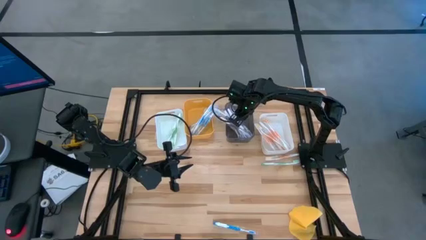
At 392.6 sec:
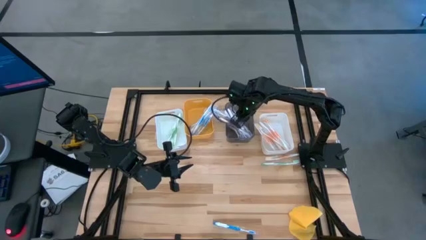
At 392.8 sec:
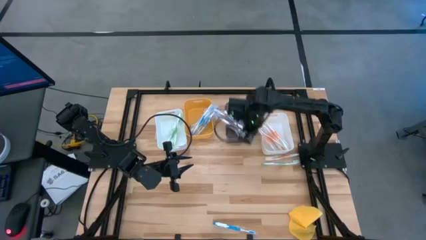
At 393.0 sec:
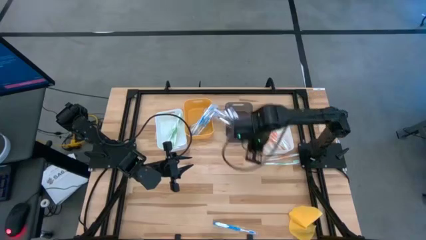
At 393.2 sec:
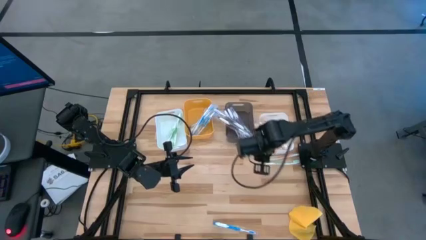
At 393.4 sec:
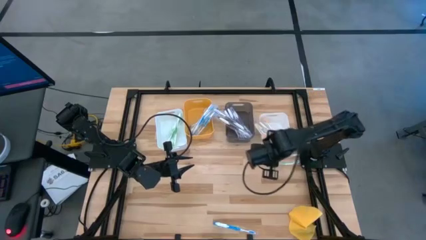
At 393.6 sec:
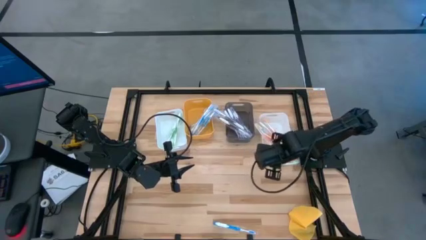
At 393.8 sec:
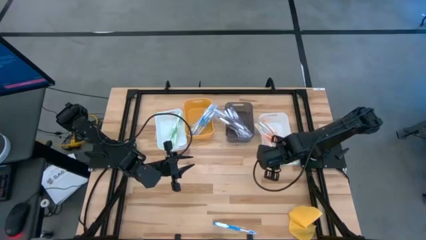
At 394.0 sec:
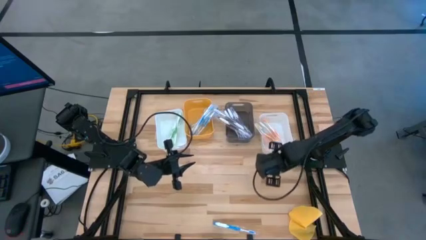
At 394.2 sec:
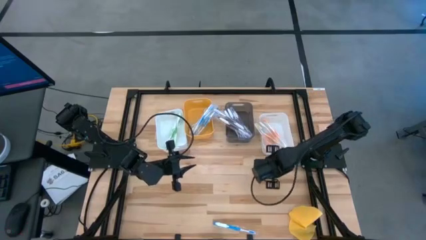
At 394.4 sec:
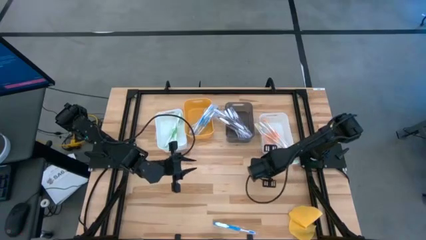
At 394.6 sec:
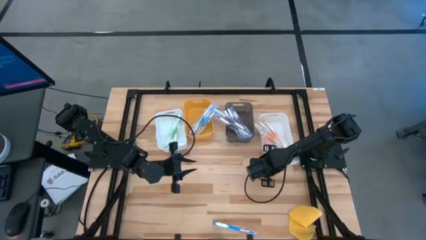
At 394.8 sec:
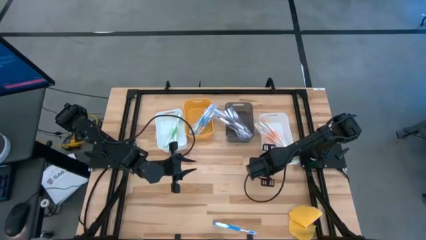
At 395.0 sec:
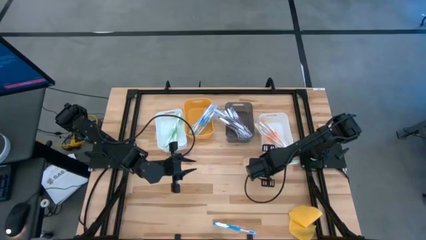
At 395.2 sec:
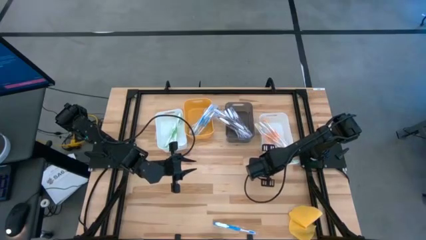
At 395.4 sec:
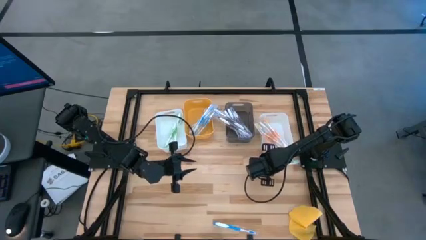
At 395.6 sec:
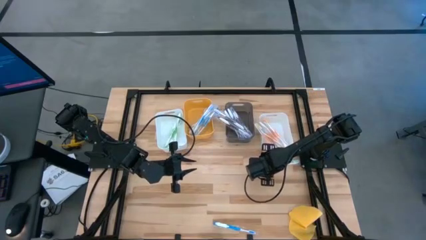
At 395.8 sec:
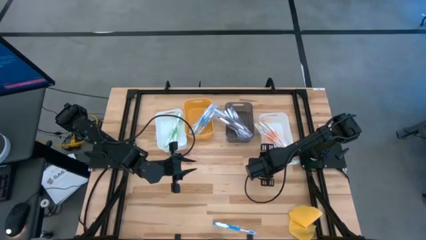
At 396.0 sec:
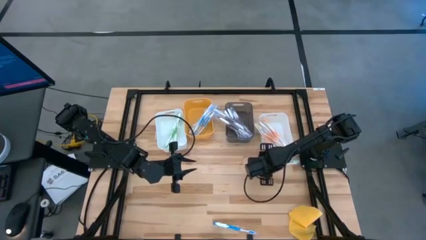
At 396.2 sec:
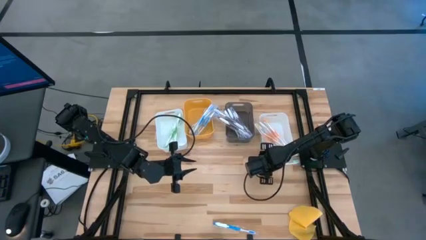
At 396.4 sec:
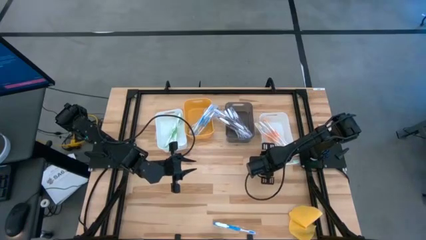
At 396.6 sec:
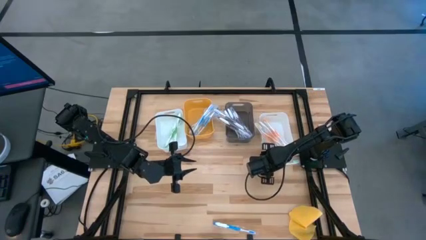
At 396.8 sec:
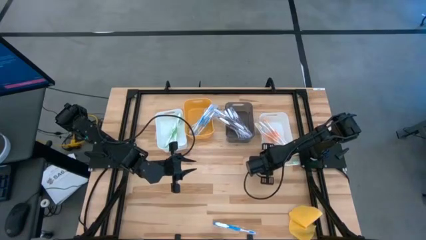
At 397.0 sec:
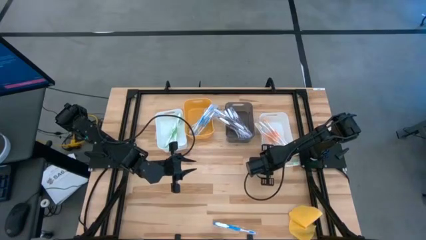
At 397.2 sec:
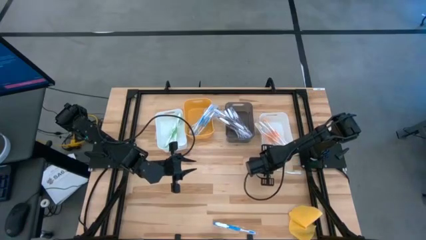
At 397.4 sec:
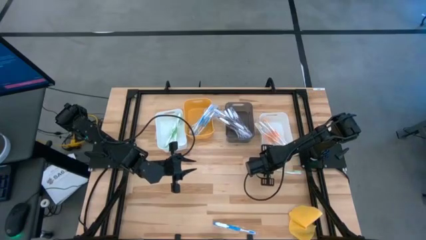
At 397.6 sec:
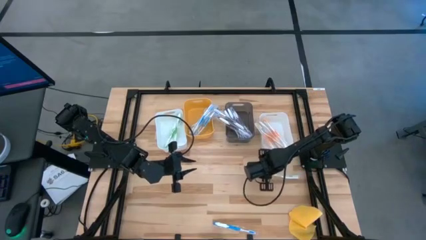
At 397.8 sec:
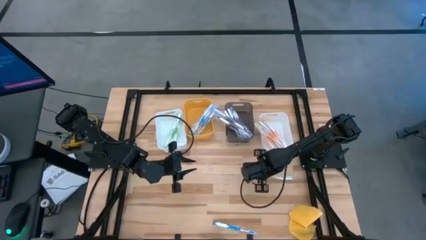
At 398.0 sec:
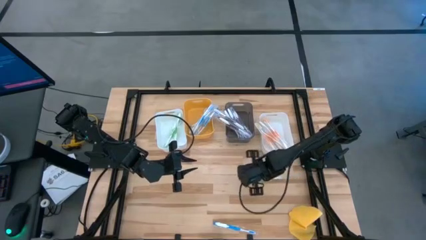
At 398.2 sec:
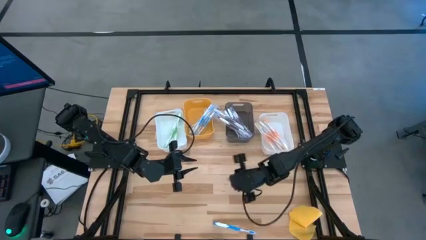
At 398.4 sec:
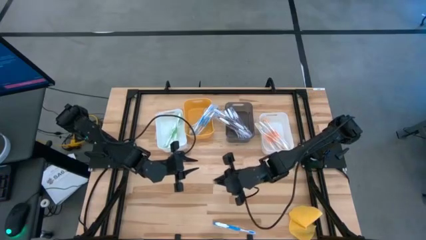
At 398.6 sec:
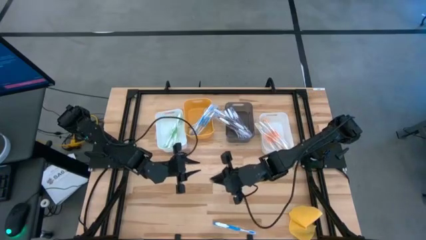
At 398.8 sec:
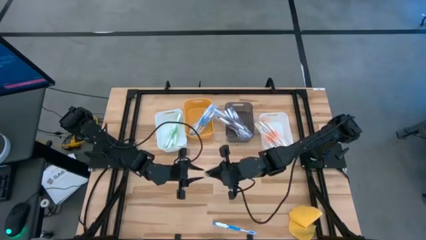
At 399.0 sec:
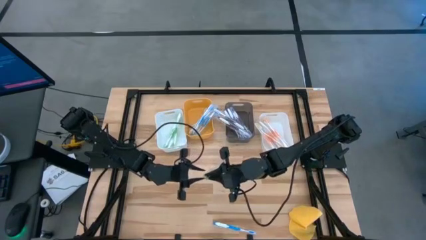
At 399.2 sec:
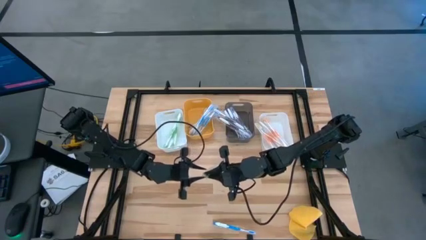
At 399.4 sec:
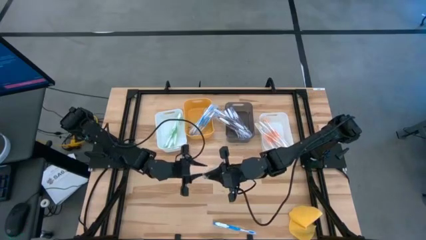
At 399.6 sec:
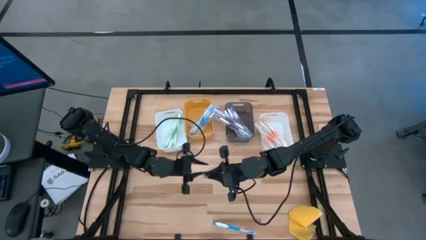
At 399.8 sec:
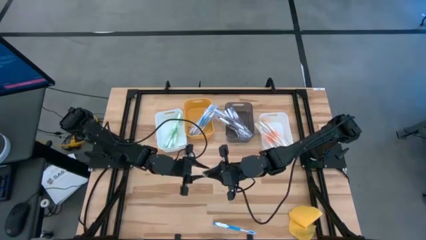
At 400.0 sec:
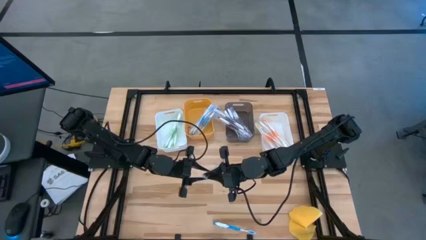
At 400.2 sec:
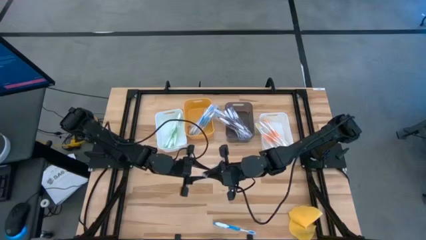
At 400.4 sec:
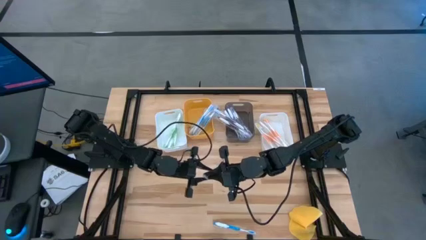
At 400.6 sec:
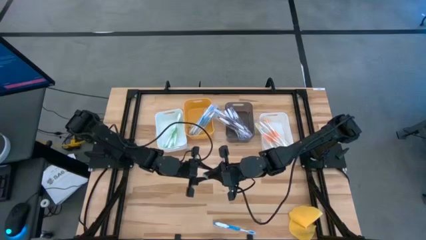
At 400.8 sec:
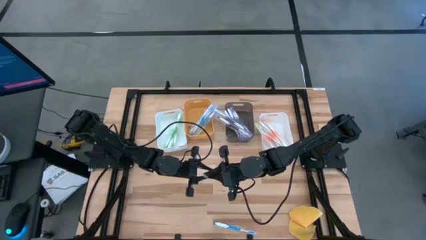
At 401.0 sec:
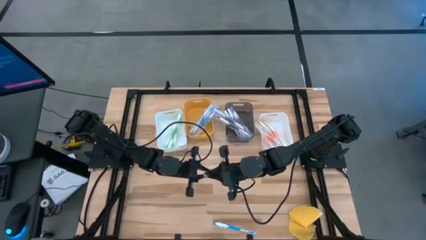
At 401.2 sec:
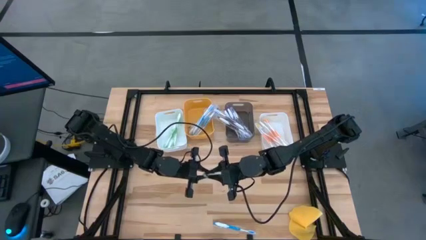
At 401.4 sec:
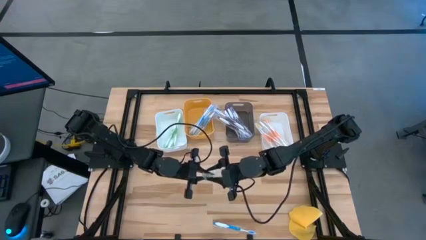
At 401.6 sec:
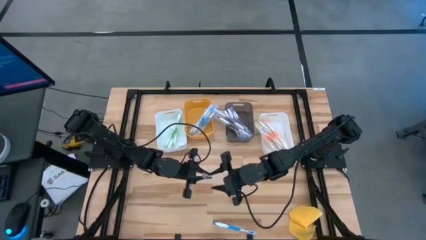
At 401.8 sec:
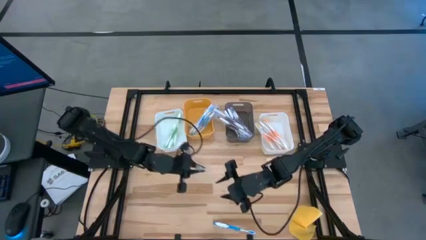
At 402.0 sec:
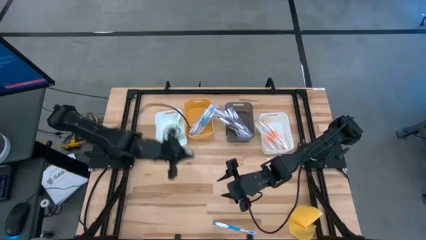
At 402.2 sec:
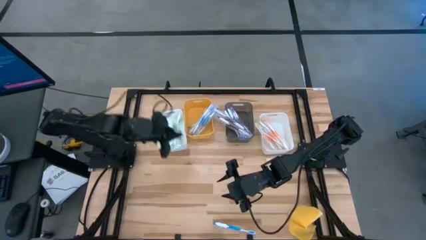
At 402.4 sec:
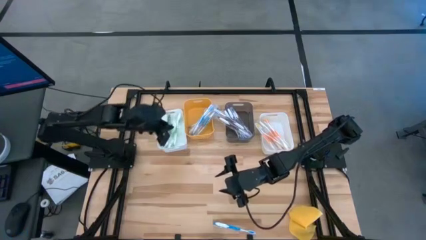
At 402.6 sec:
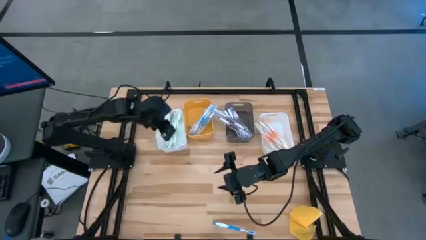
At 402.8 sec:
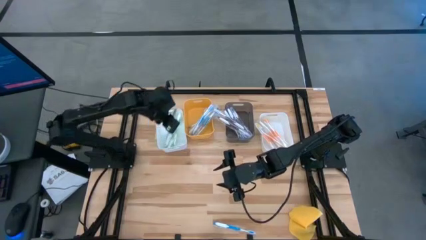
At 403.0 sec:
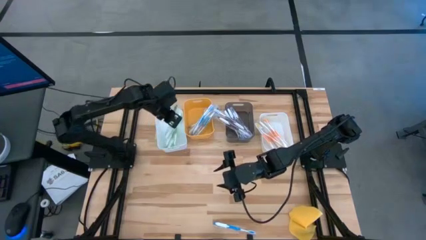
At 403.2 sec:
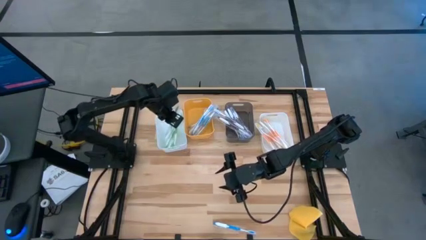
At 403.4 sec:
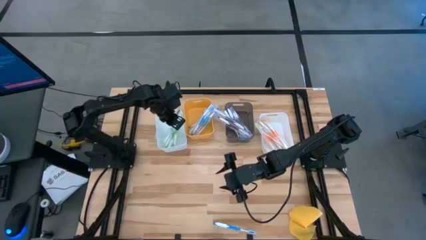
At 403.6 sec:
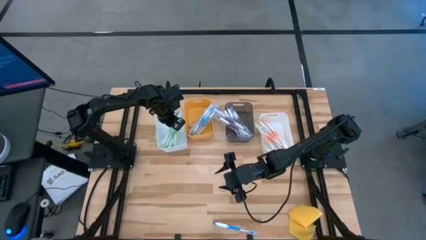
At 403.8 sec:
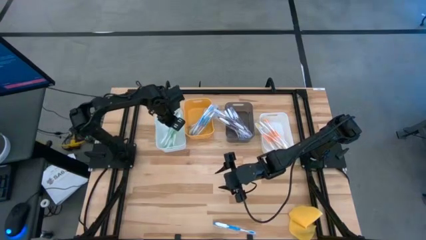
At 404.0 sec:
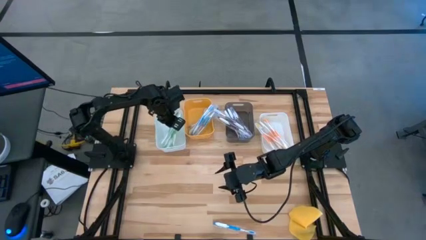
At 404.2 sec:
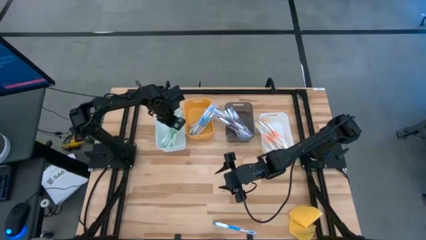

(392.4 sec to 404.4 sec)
Task: Pick & Place Toothbrushes
Put the green toothbrush into the left white bin

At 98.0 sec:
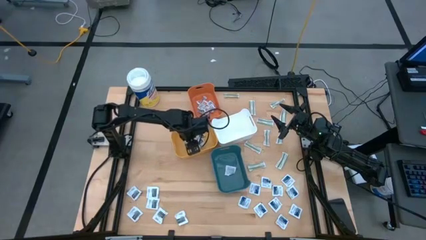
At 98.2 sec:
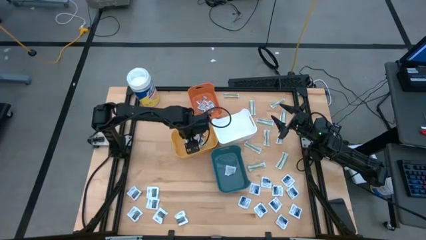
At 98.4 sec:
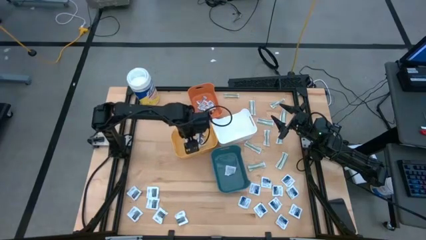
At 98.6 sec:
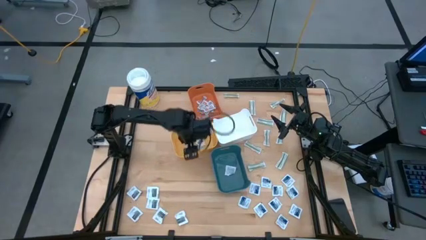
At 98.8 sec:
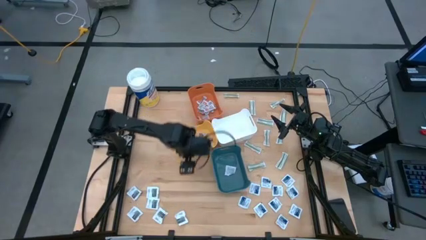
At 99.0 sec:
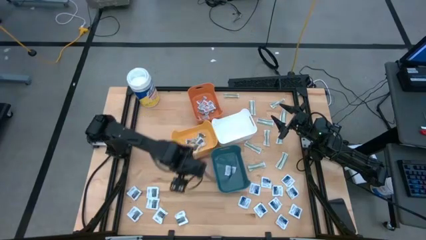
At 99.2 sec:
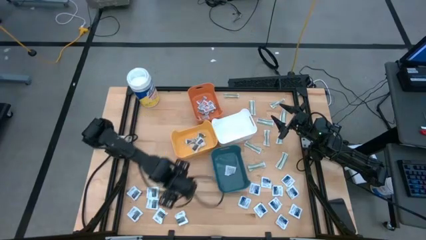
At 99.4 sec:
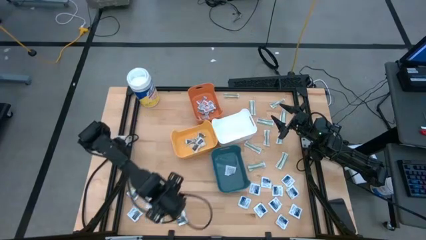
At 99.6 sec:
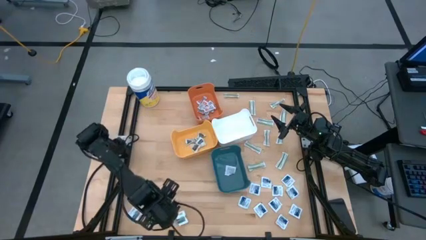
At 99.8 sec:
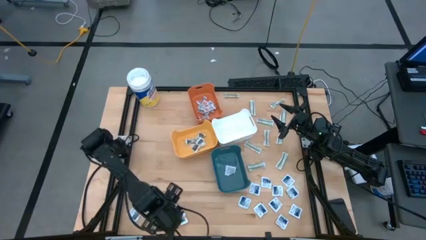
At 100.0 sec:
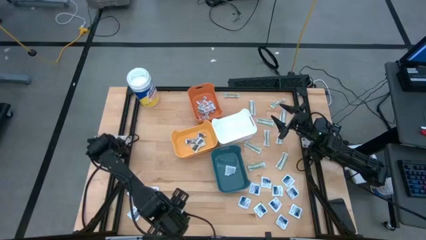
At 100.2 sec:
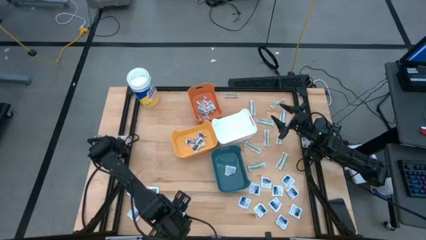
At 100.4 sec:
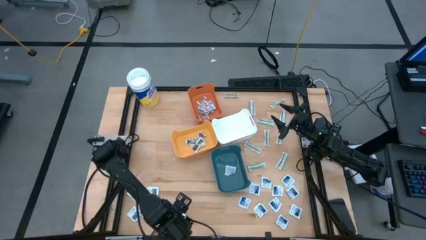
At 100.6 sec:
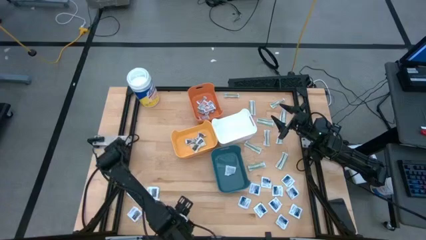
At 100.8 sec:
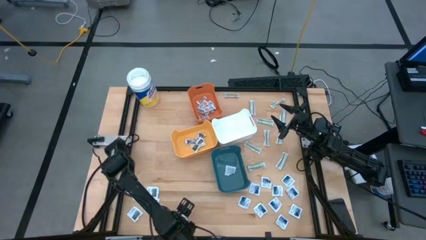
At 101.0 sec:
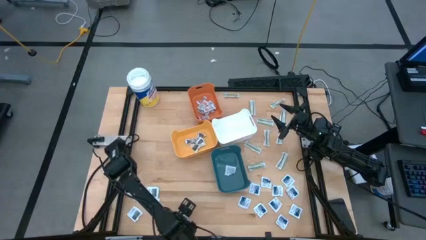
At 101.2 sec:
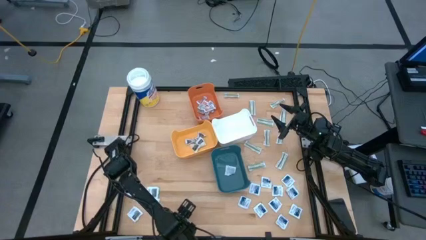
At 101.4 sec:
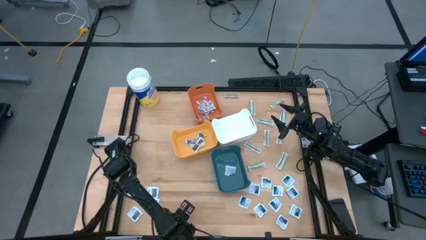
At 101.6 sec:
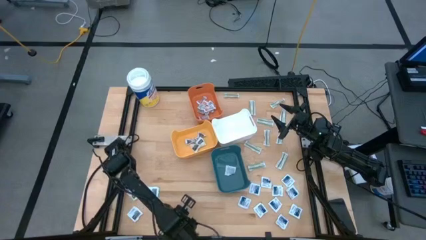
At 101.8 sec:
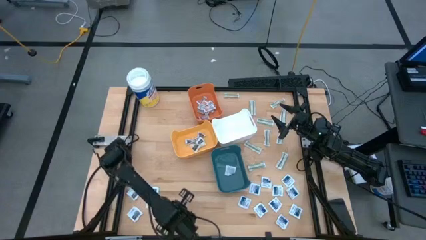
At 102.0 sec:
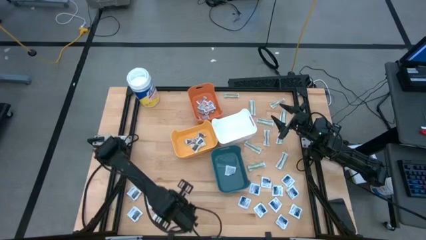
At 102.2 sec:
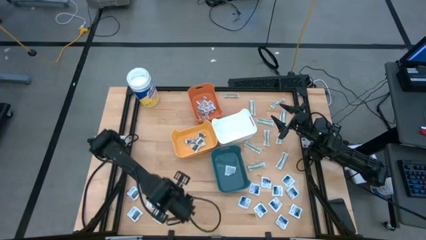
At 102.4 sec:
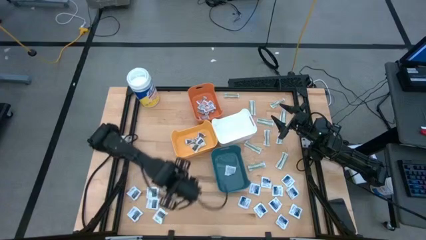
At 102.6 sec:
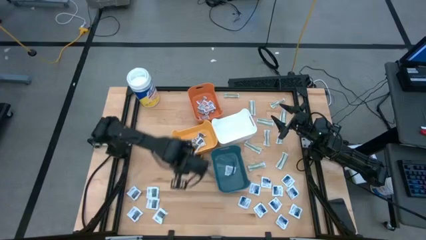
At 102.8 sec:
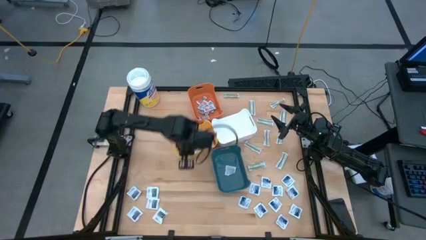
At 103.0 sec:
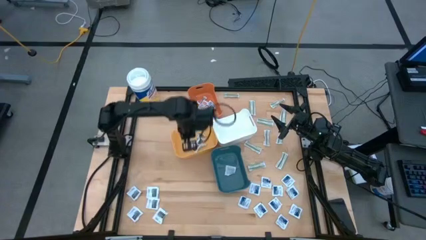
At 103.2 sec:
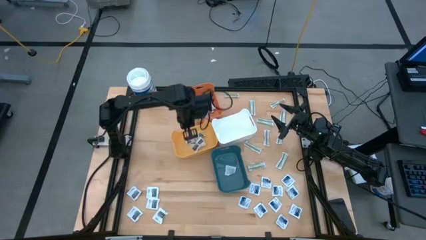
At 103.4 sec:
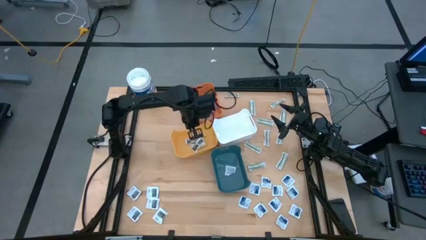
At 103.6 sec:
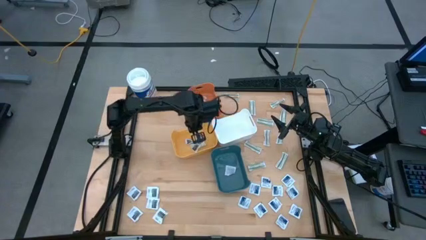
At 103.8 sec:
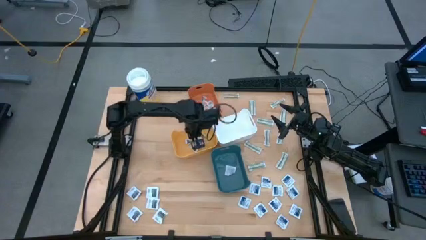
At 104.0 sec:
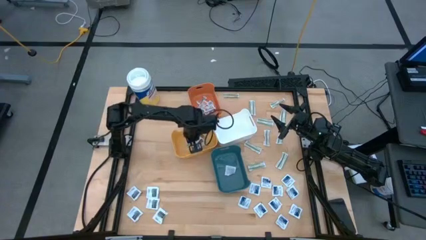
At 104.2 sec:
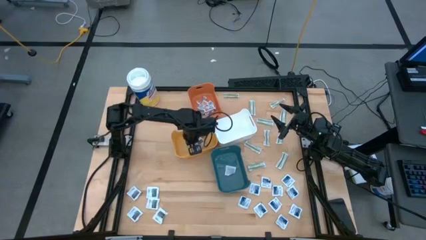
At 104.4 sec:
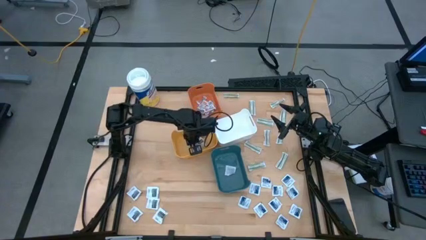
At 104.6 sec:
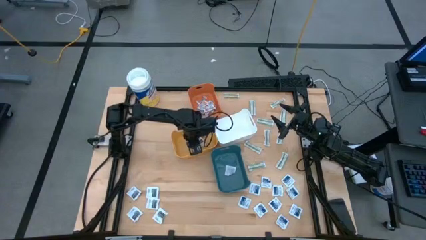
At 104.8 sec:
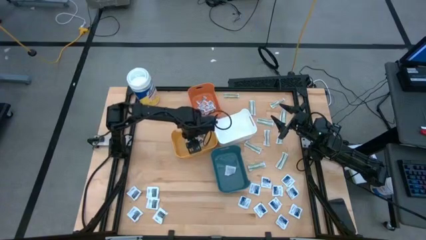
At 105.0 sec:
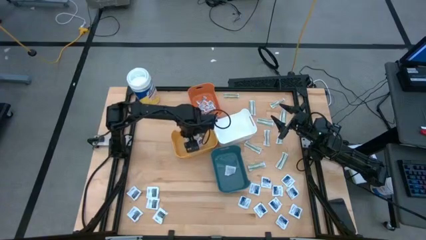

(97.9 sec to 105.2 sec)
Task: Pick & Place First Aid Supplies
Put the black towelette pack into the yellow bin
